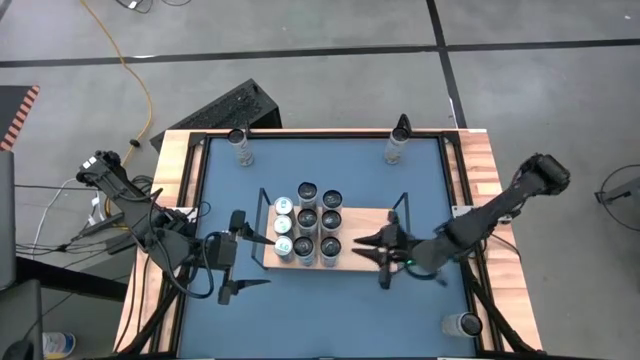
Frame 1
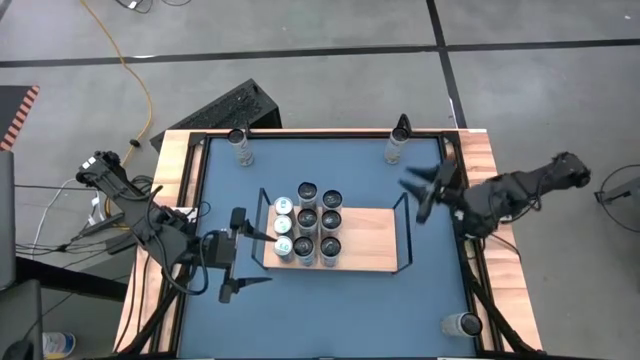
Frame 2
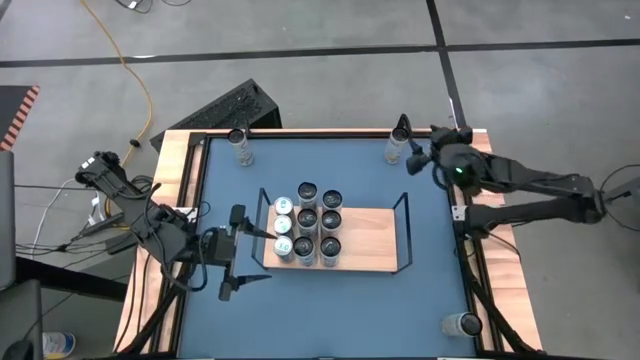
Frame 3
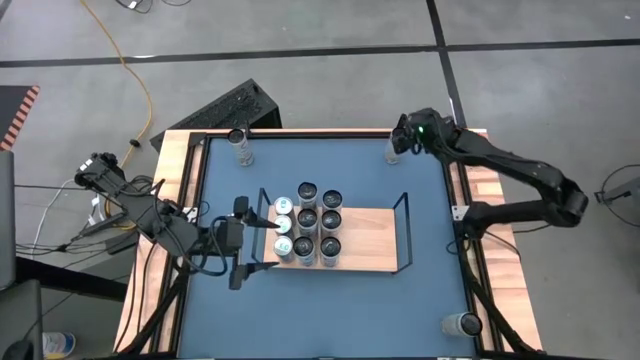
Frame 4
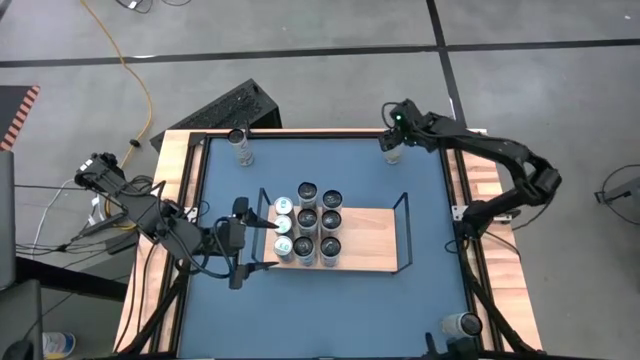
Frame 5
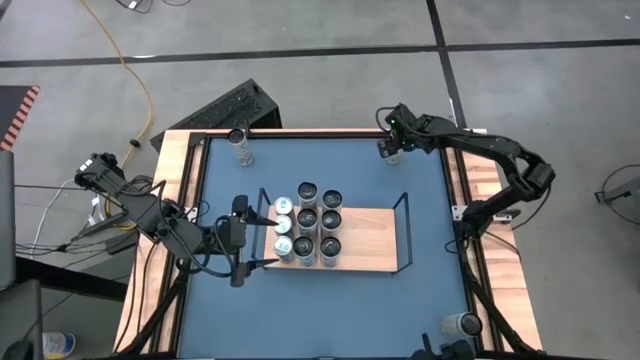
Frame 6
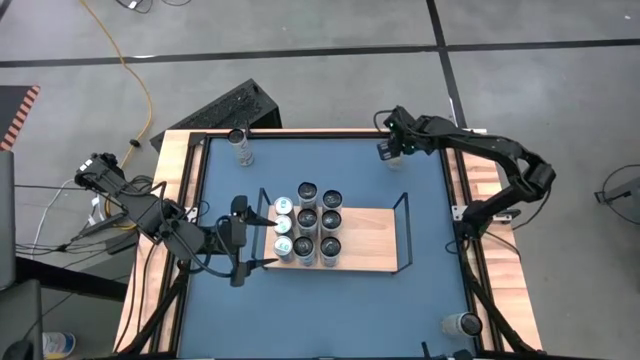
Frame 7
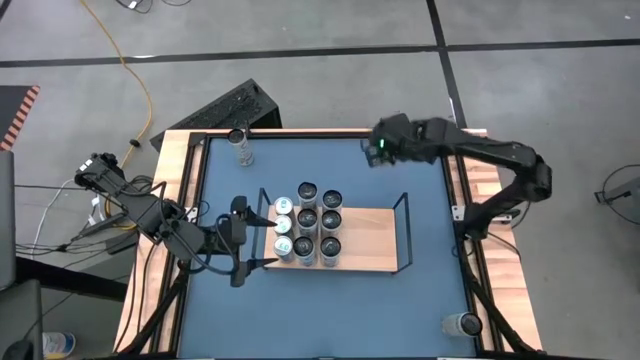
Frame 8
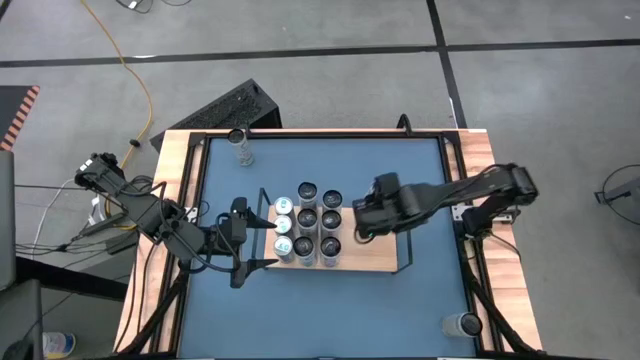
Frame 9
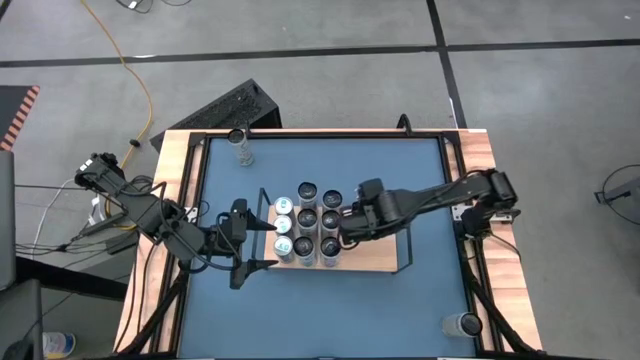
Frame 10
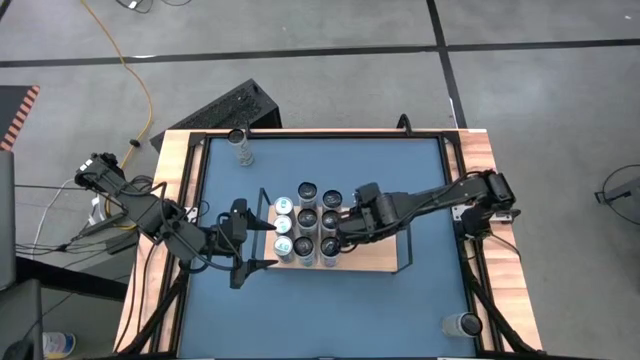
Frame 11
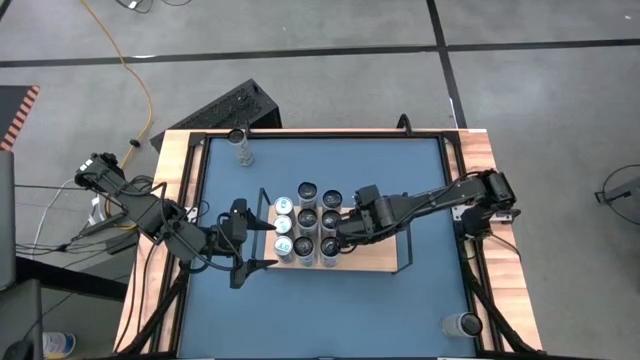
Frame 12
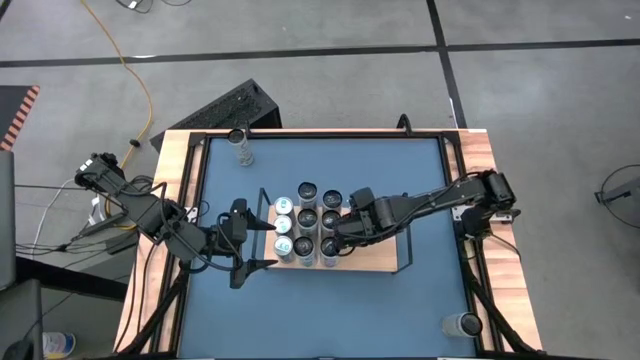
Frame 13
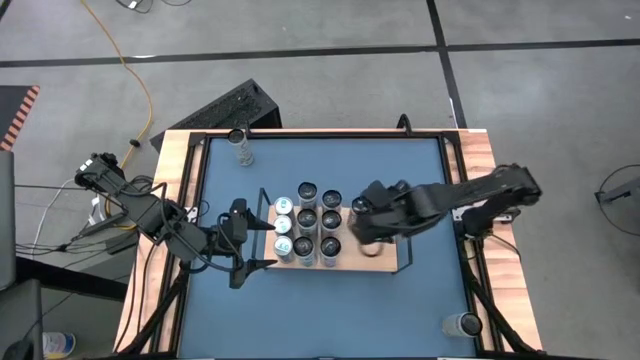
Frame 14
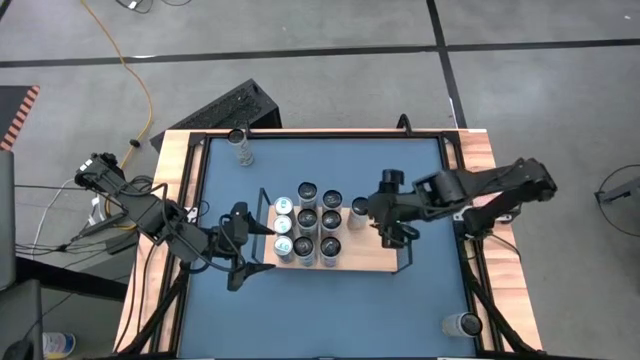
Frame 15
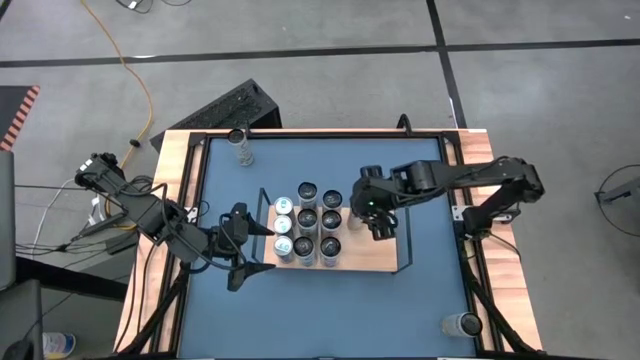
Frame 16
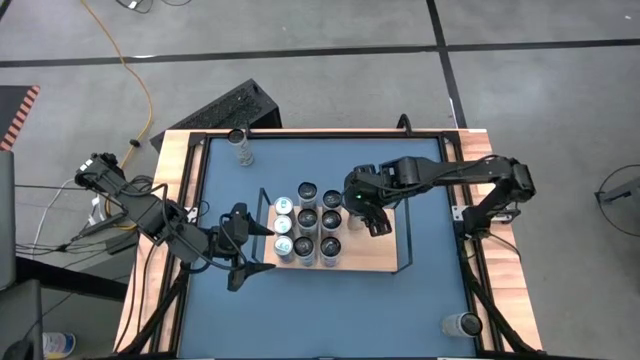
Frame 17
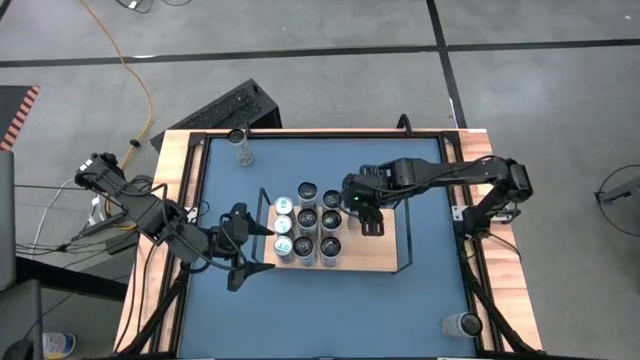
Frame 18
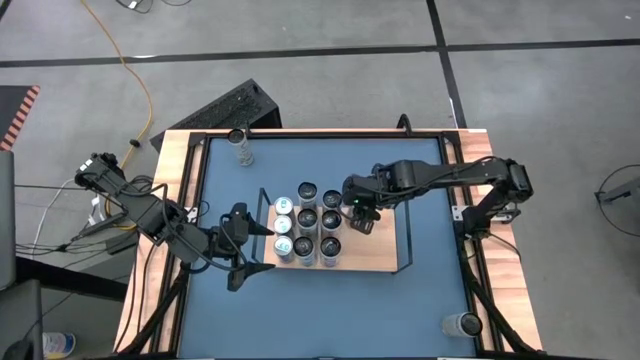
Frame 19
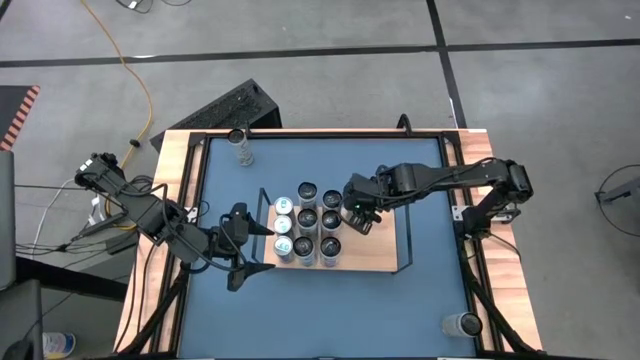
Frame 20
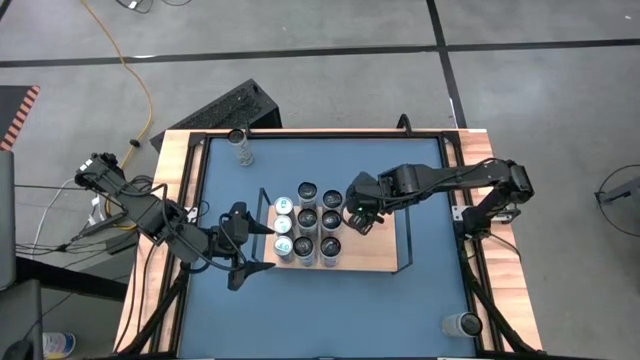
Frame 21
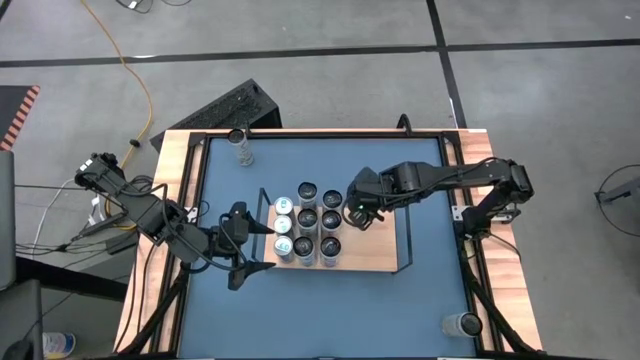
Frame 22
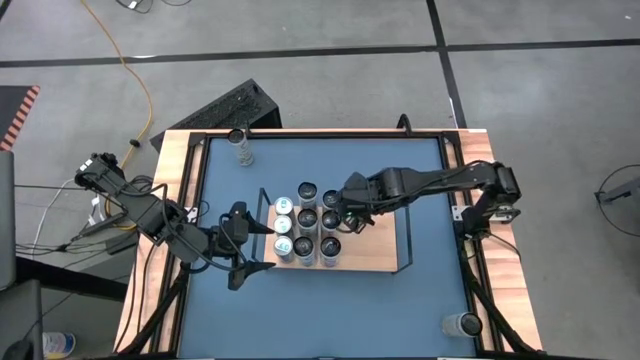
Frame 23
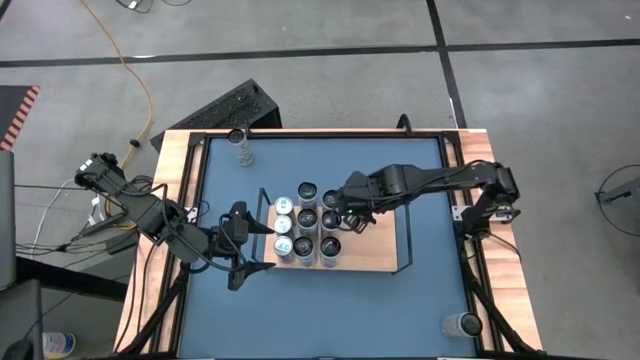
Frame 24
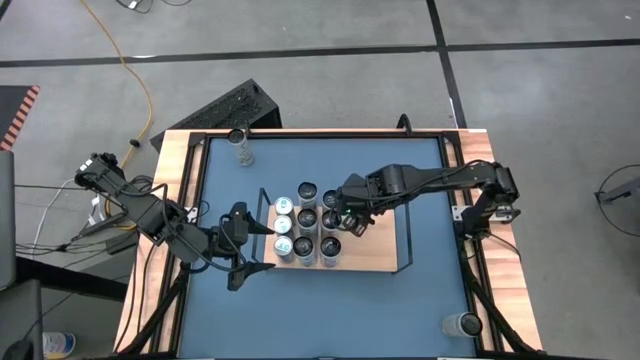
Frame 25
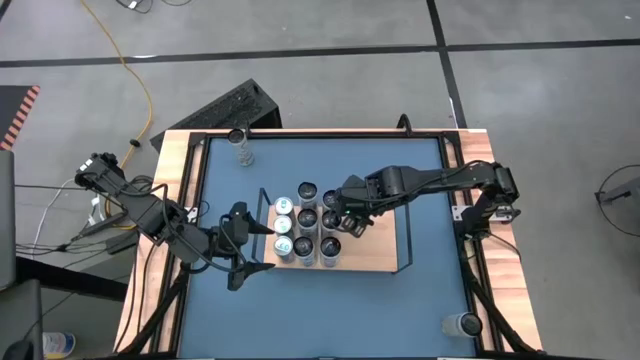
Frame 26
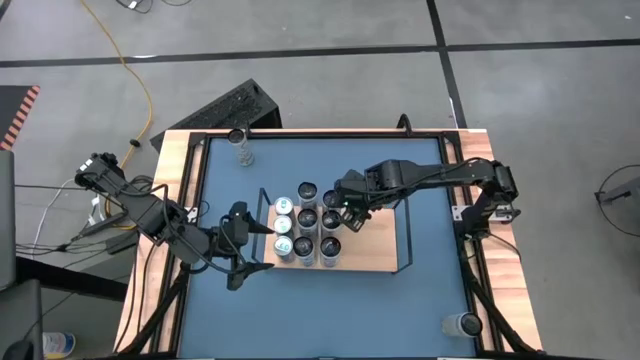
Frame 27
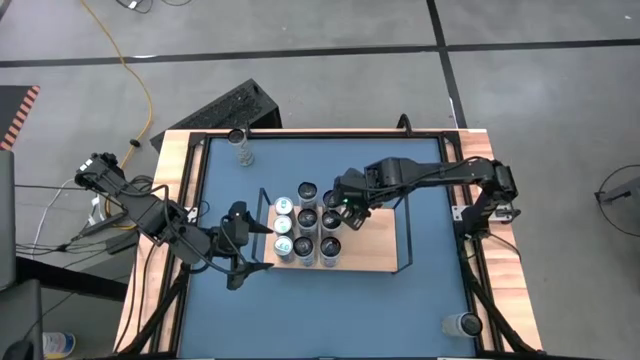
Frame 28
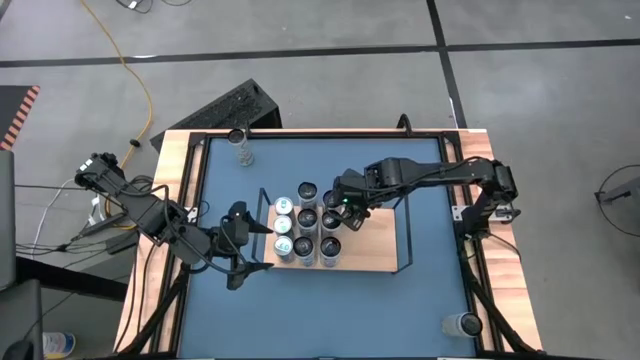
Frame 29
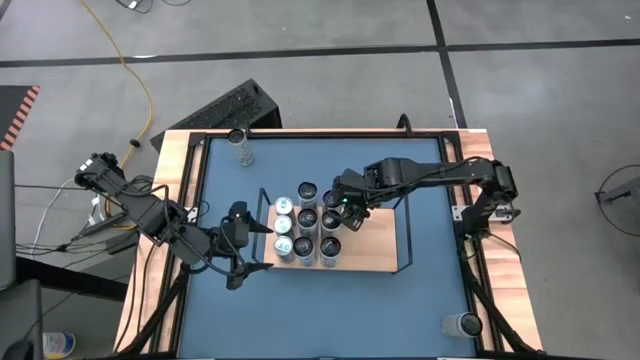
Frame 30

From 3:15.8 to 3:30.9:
Task: Place canned beverage on shelf
Put the top right yellow soda can on the shelf

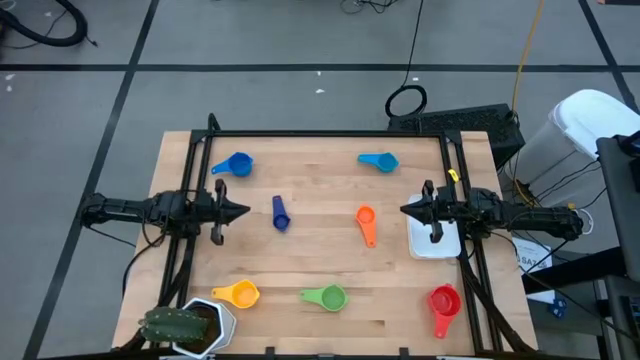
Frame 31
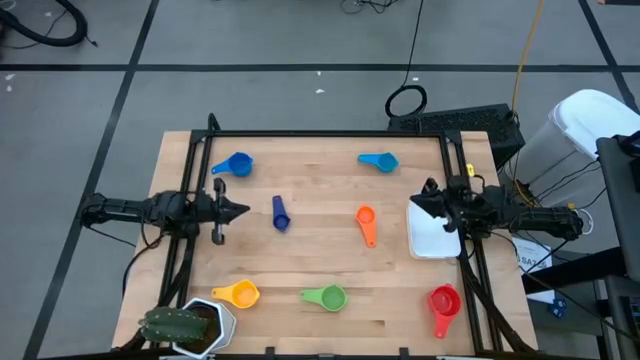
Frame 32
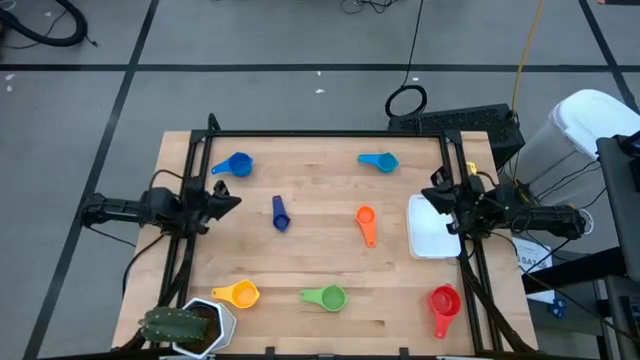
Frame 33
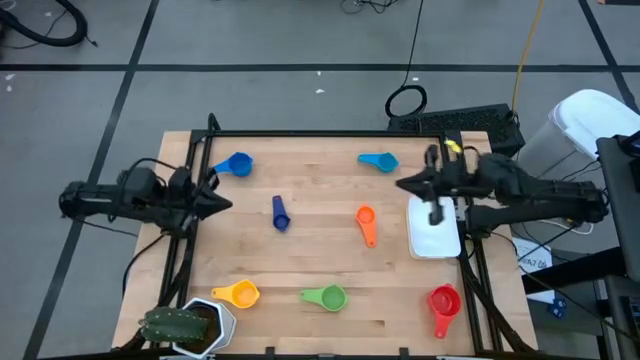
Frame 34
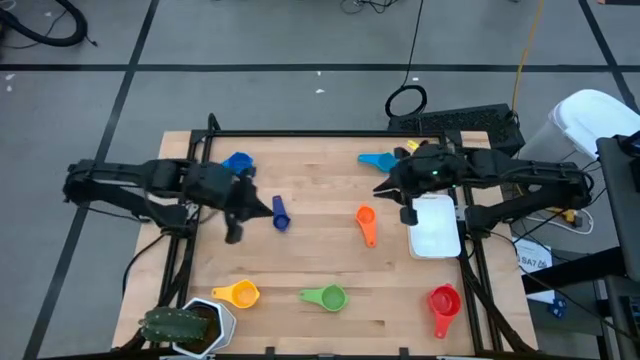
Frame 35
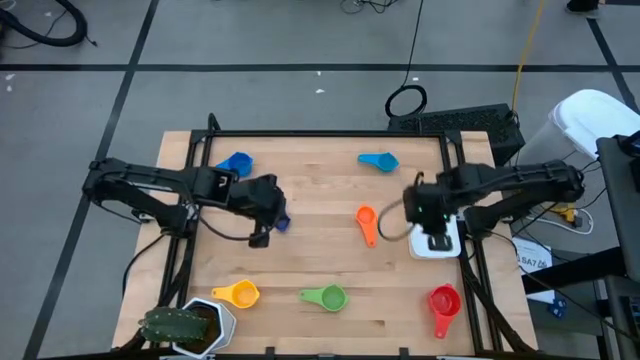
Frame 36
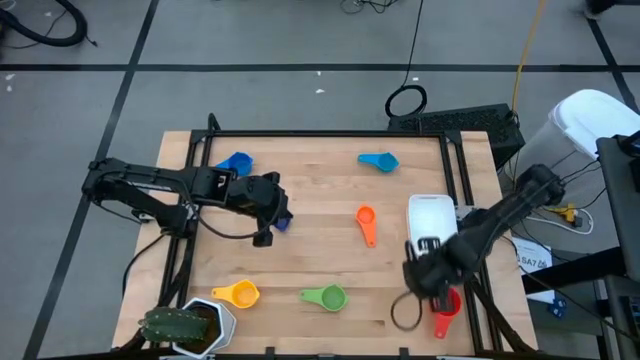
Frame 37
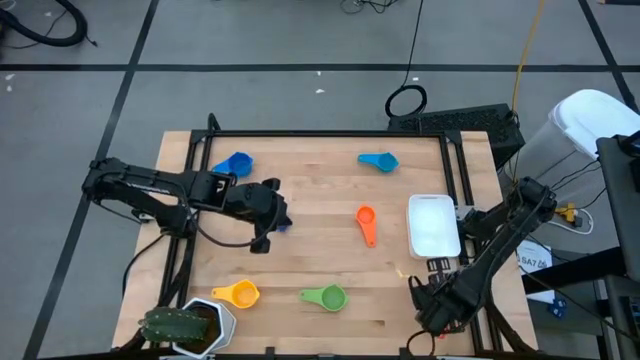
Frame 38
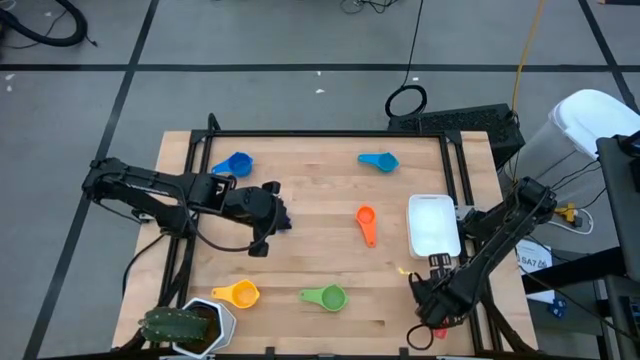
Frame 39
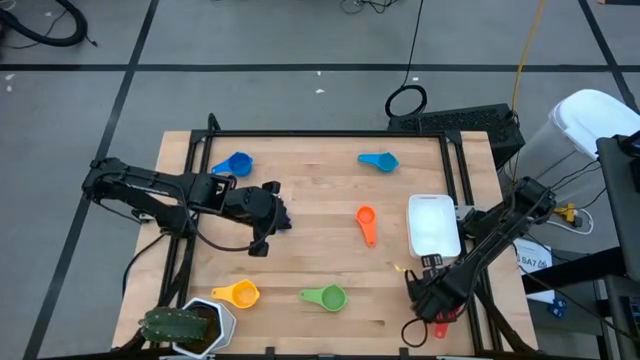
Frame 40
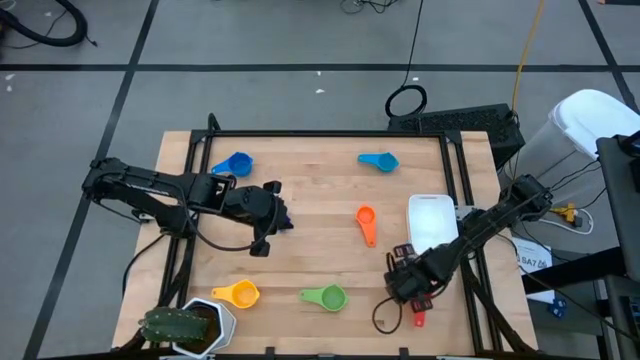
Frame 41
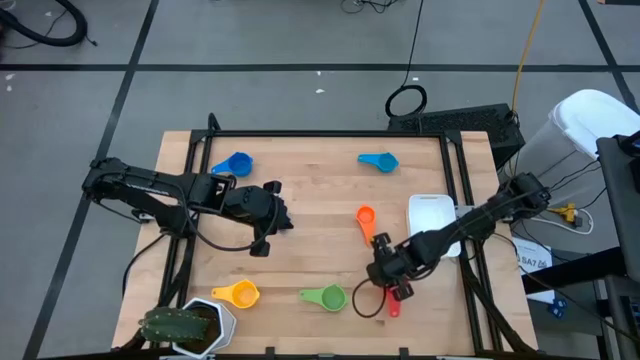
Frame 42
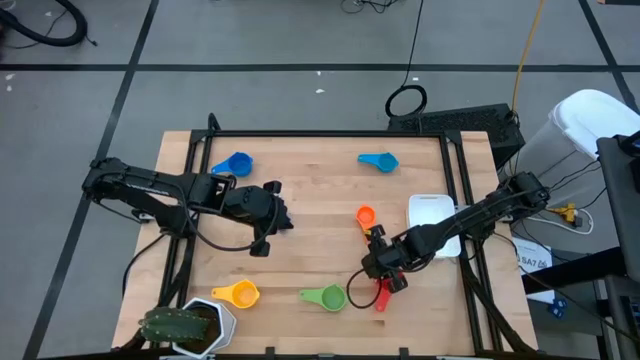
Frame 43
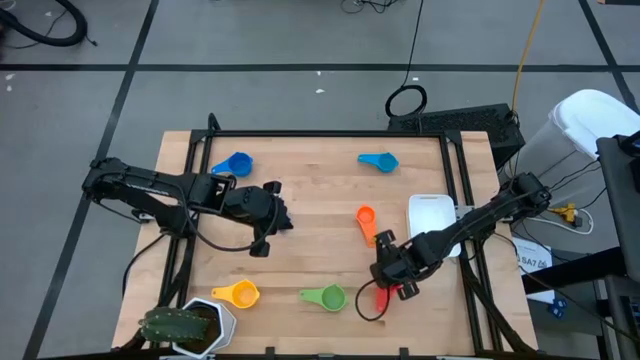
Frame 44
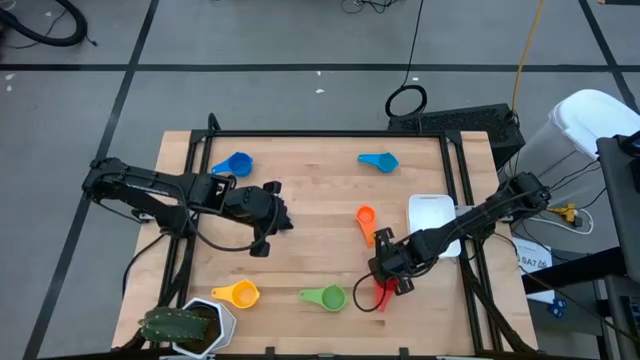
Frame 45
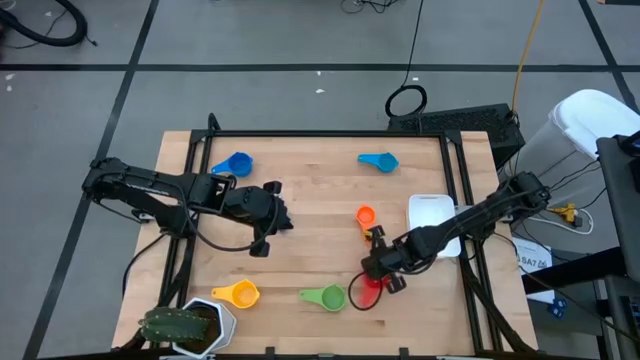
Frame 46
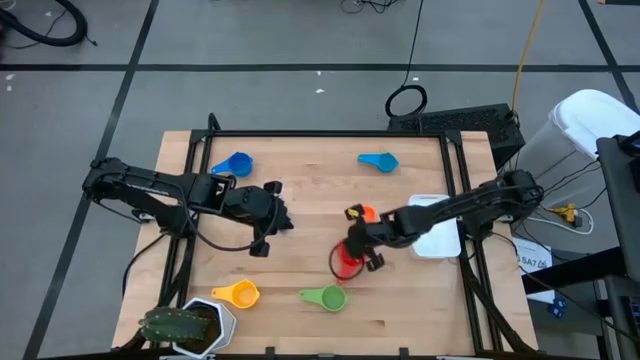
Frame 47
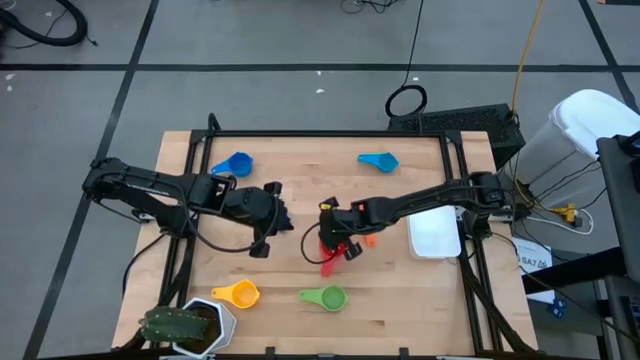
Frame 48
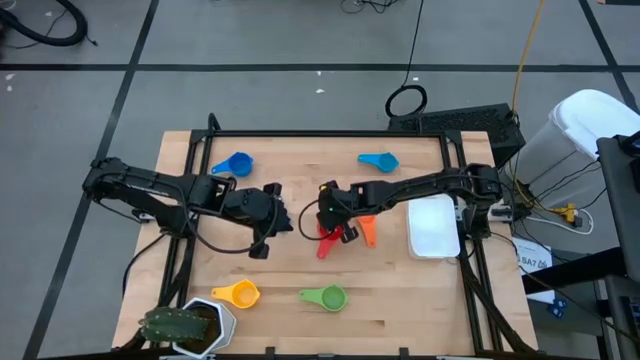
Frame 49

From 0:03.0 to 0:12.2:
Task: Nest measuring cups in basket
Move the red measuring cup to the center of the table
